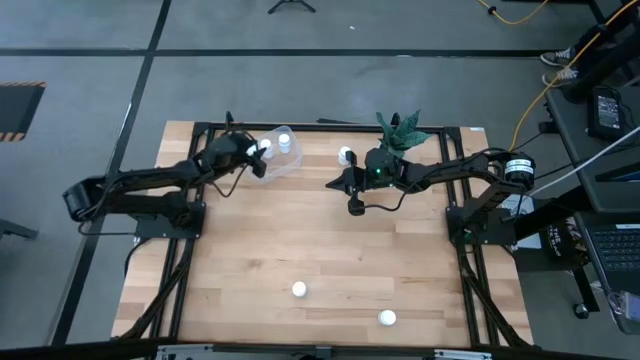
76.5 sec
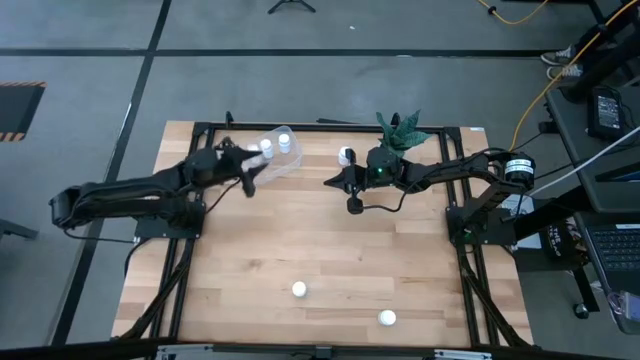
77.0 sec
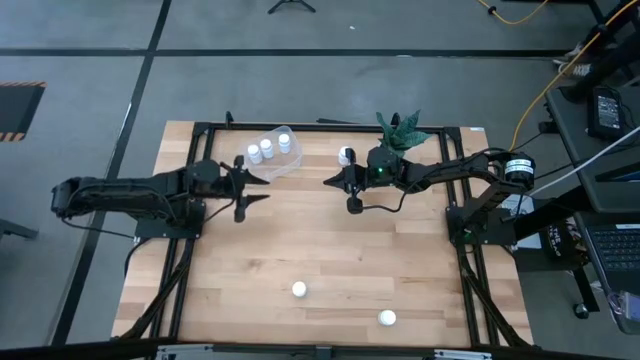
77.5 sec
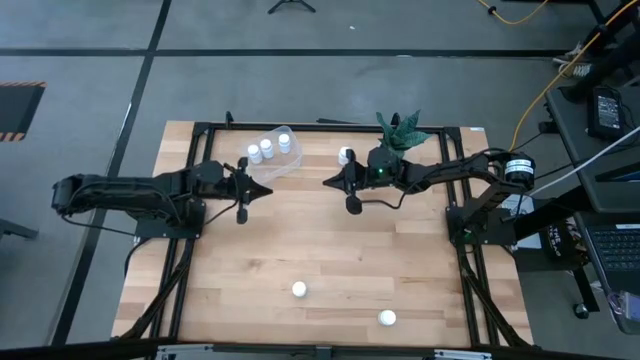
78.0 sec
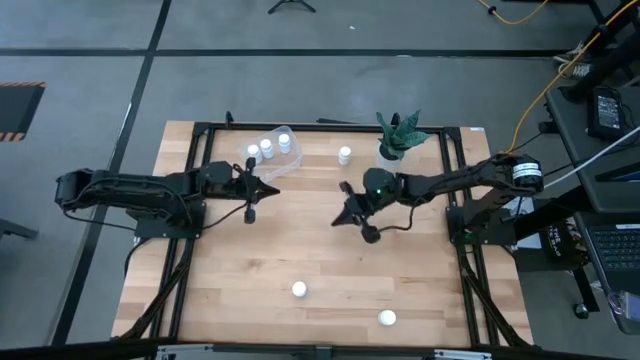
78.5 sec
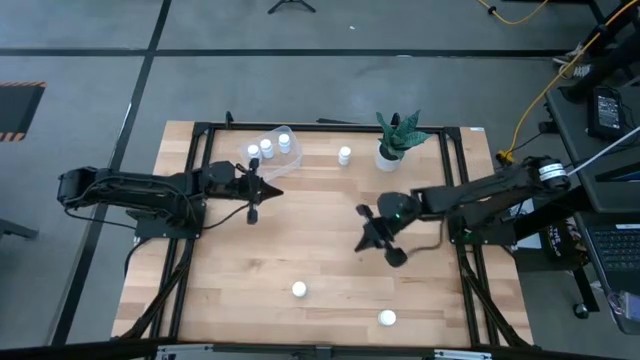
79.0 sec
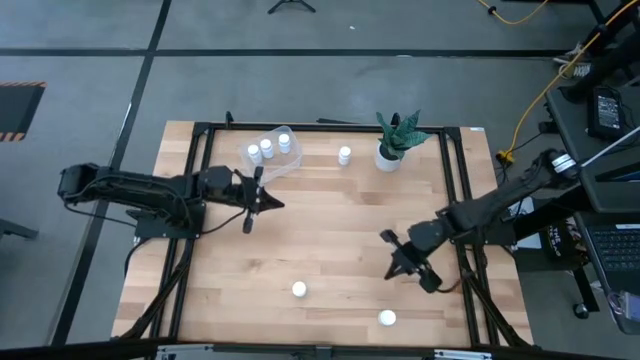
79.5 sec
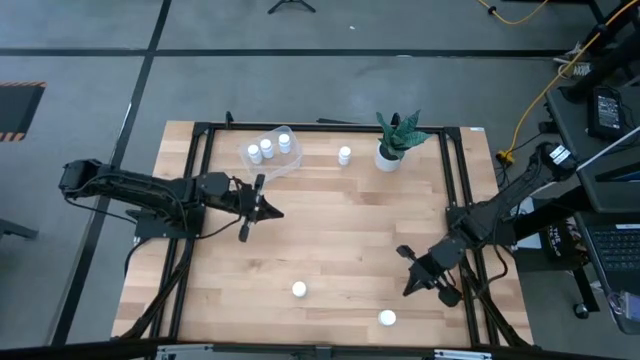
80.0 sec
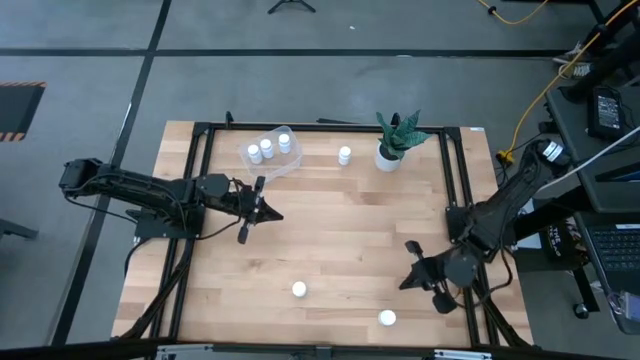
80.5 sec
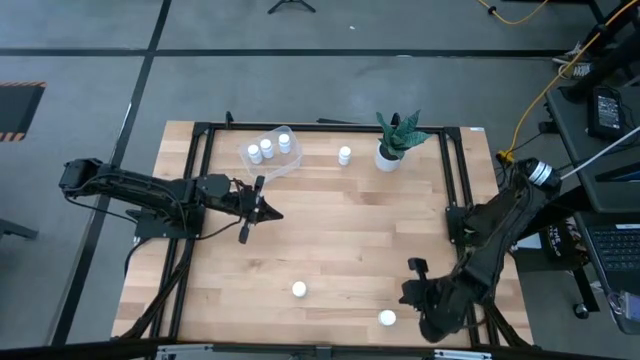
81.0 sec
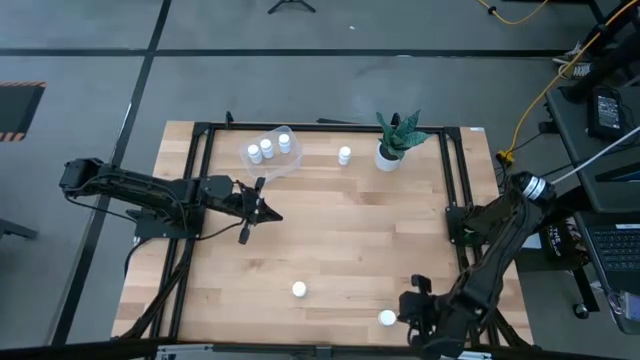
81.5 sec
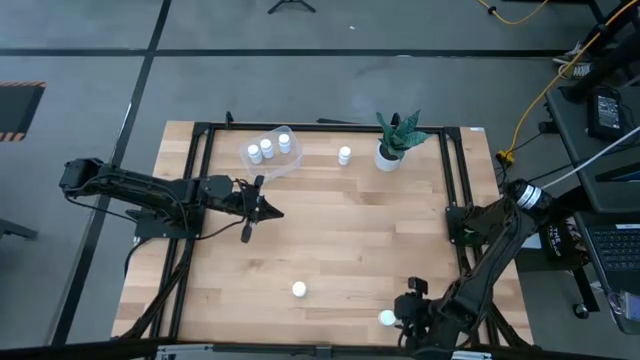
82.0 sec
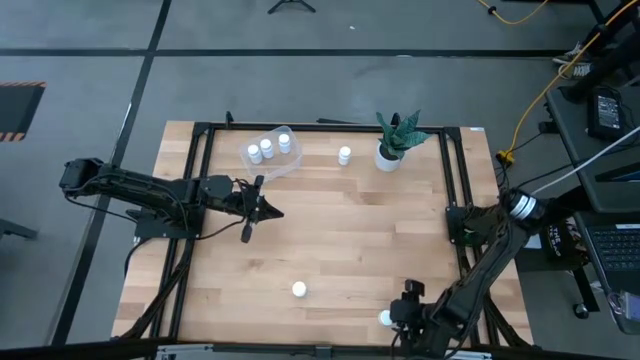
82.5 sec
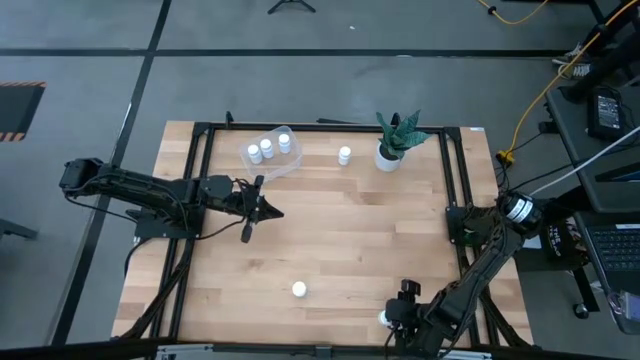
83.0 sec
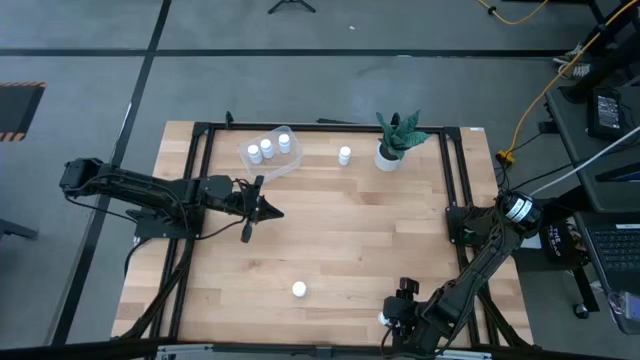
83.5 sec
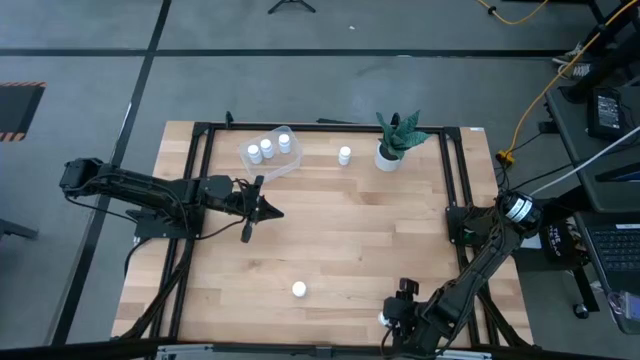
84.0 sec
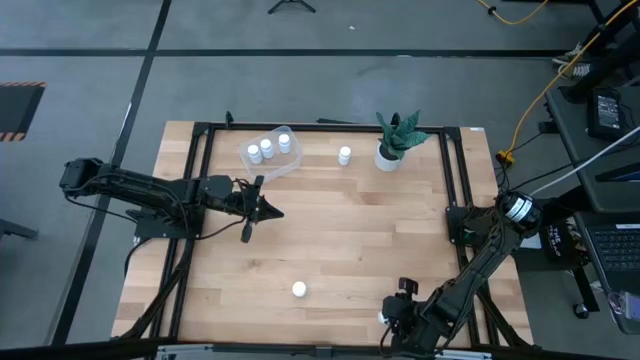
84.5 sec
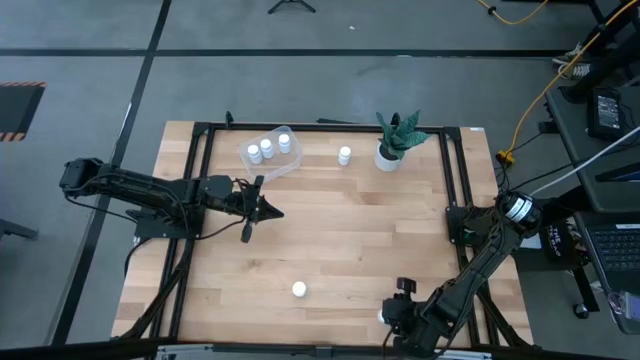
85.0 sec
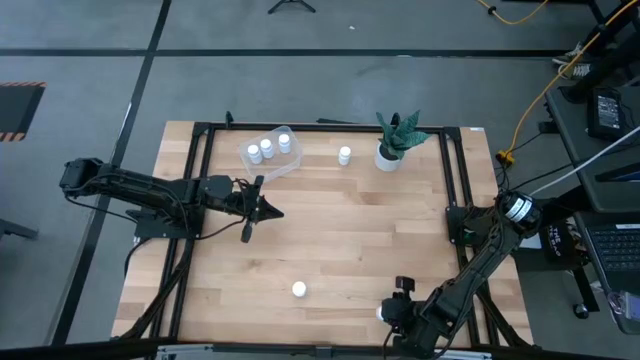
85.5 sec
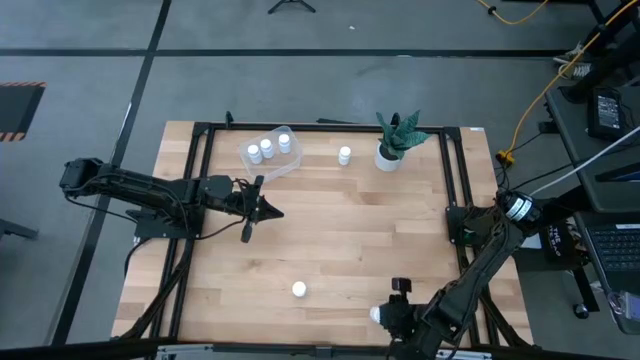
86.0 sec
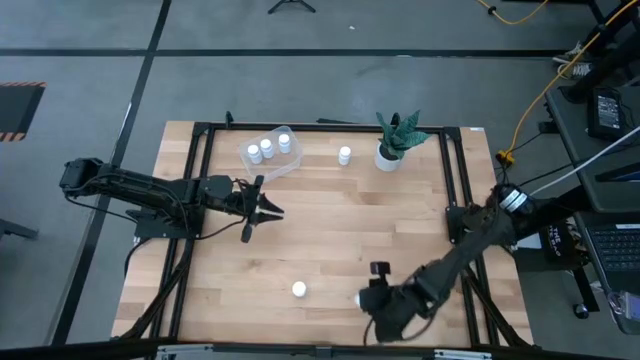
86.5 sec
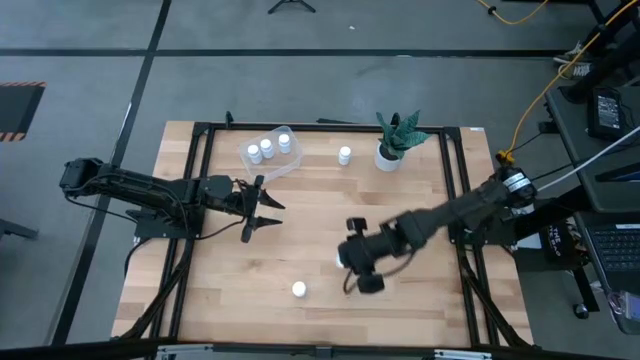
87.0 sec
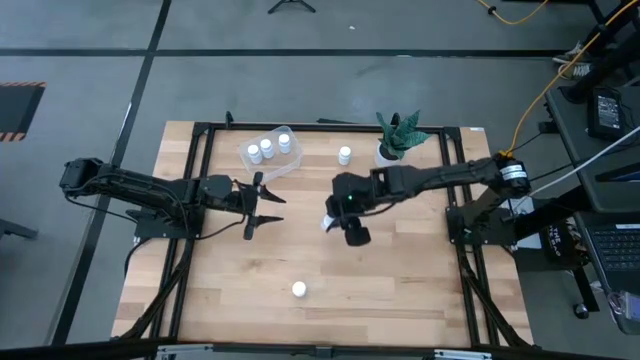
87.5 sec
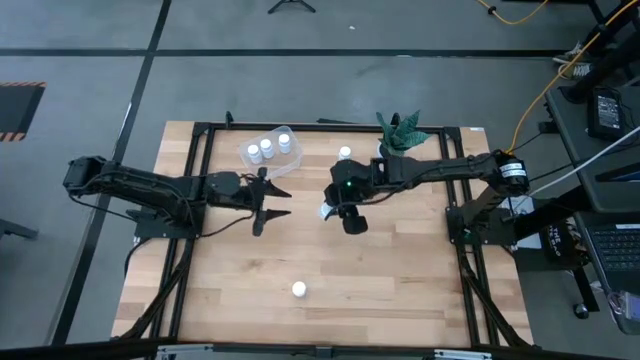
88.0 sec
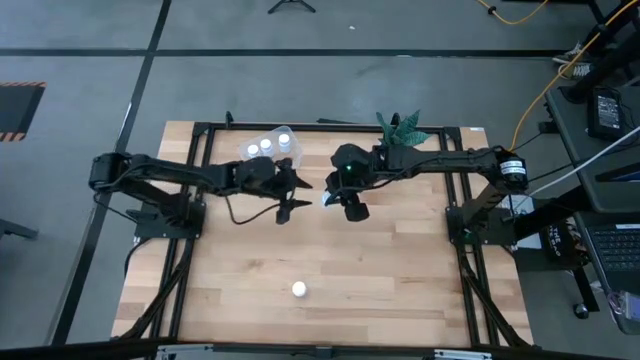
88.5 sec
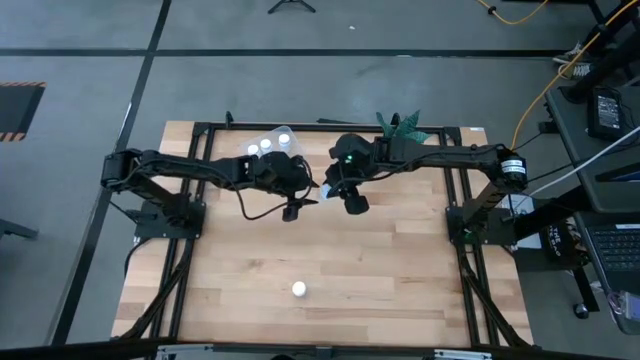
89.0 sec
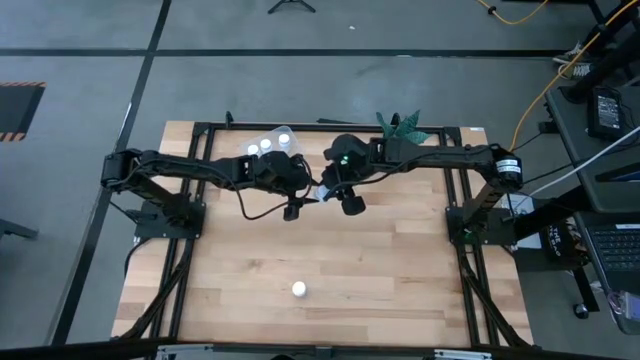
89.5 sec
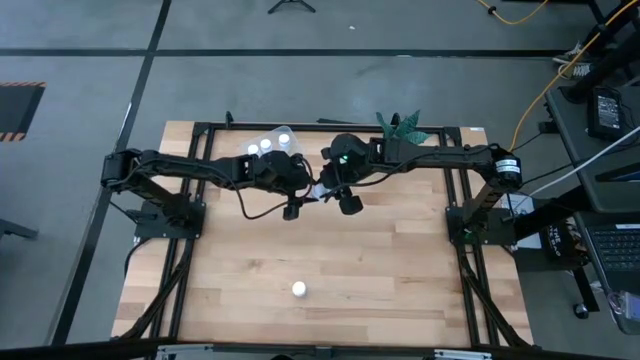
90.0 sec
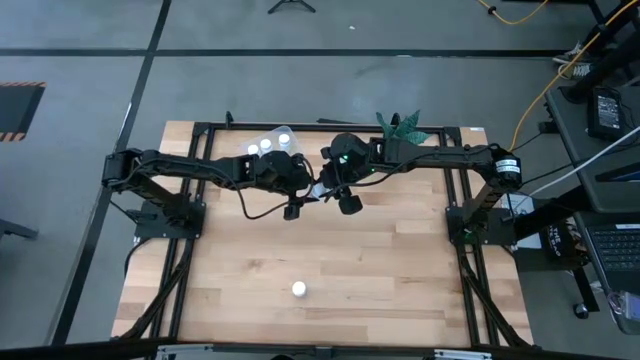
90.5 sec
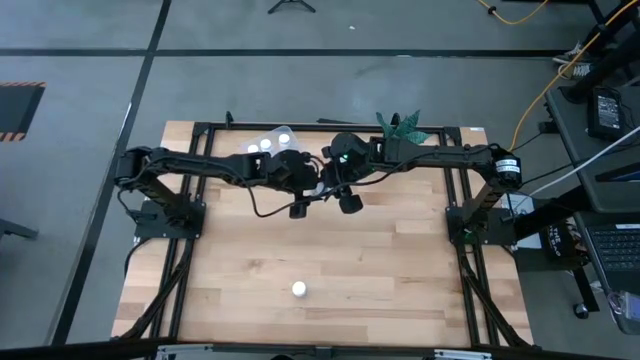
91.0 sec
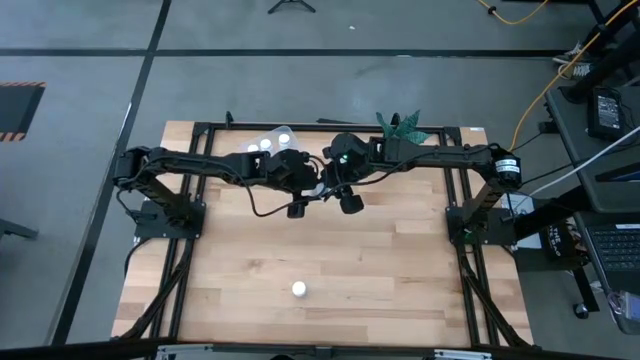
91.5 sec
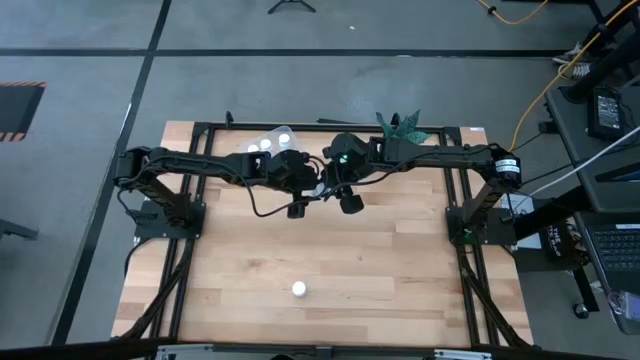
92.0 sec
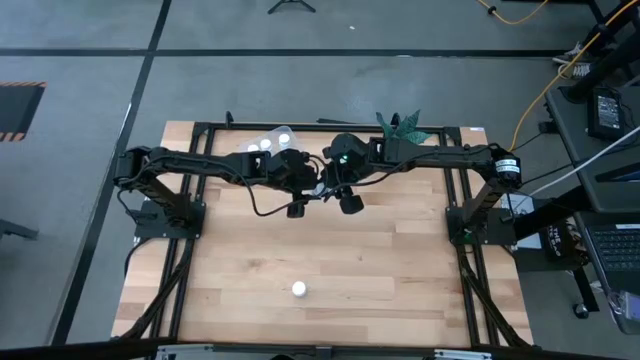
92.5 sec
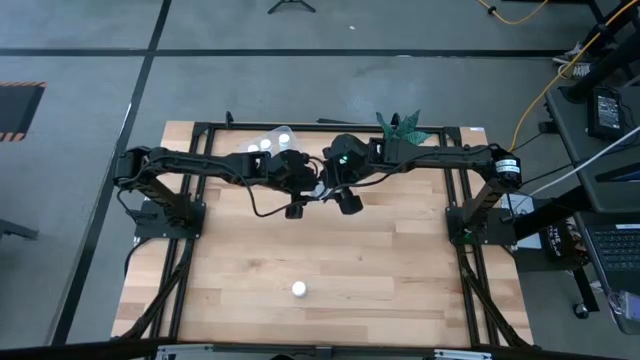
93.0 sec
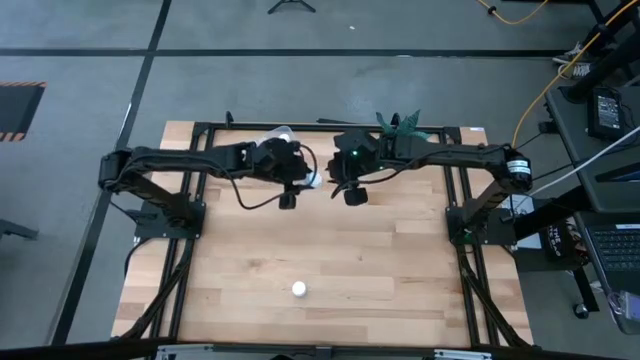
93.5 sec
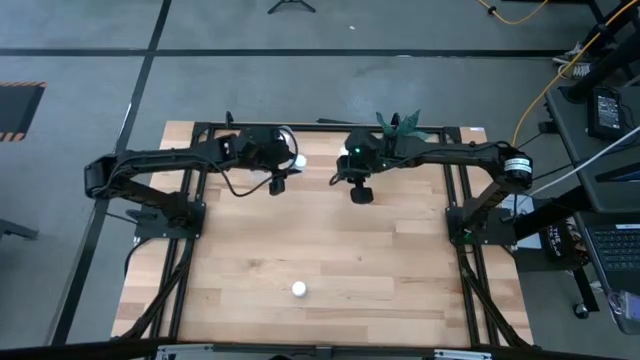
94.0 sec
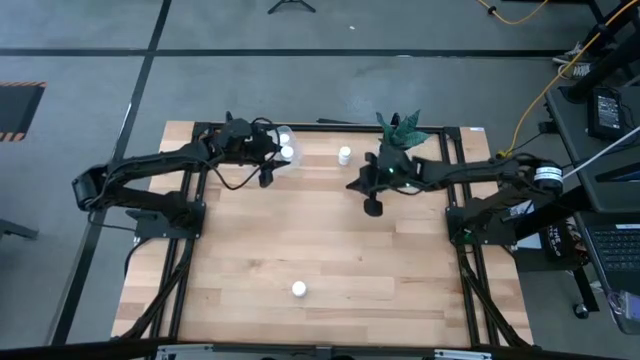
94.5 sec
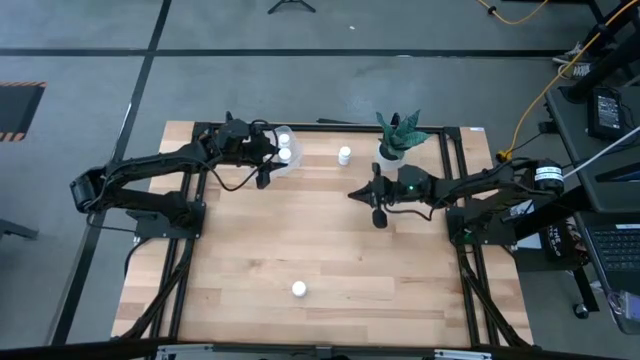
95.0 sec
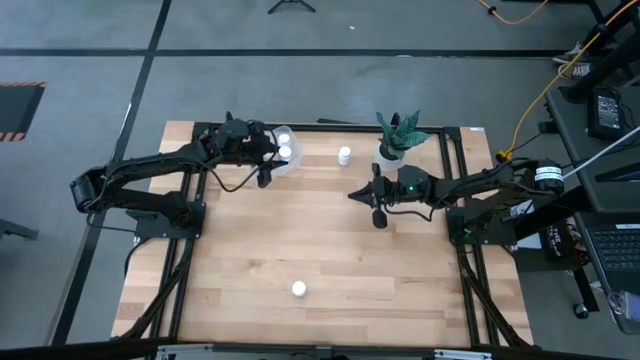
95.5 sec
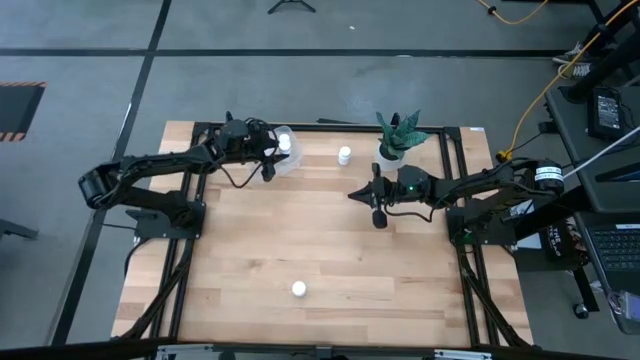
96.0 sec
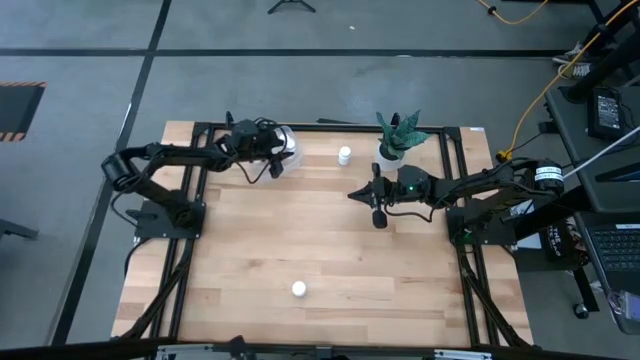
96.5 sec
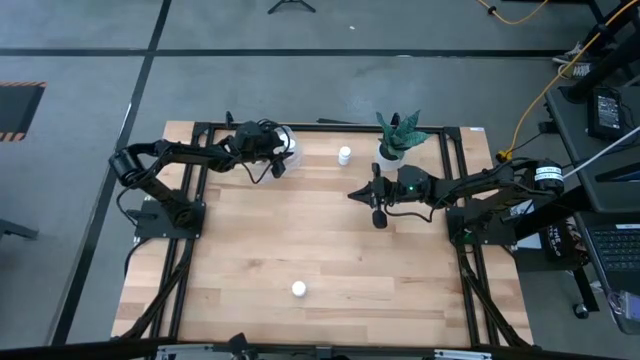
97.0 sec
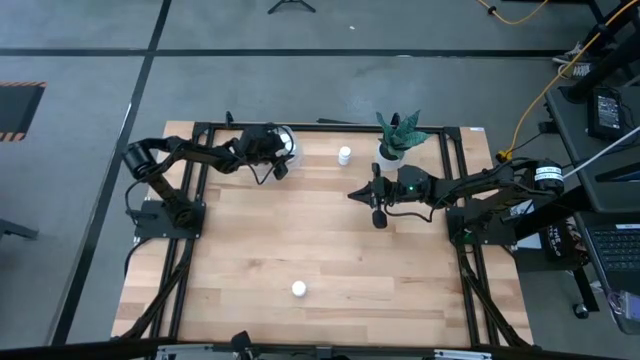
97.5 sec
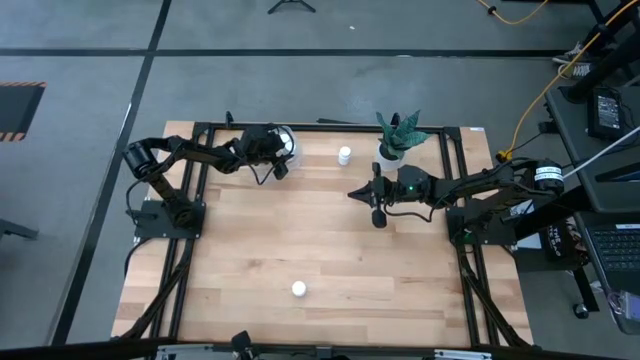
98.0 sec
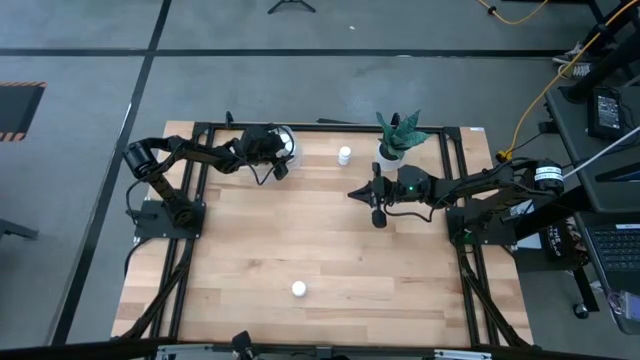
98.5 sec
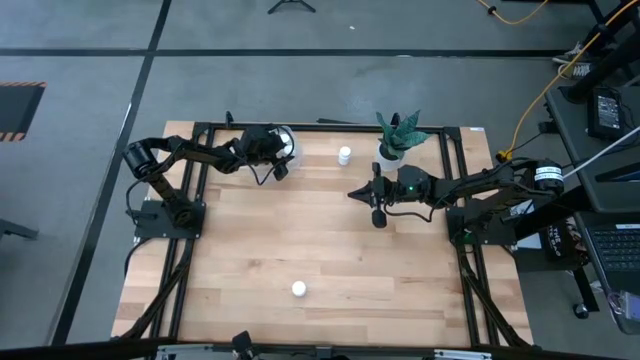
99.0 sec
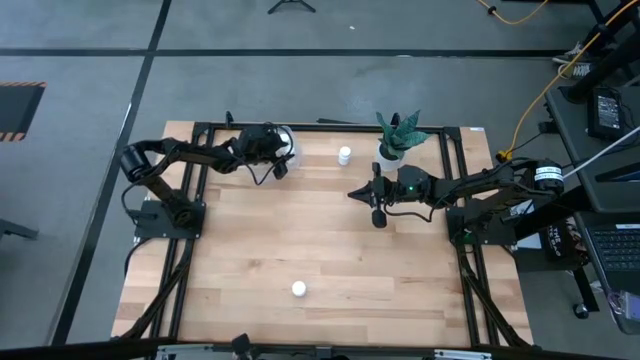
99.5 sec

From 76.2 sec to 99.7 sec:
Task: Pick and place pill bottles into a basket
Put the white pill bottle into the transparent container
